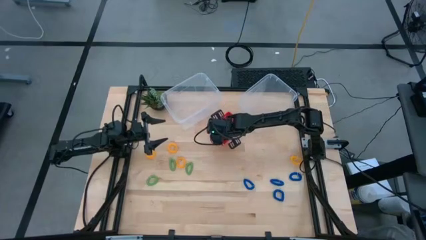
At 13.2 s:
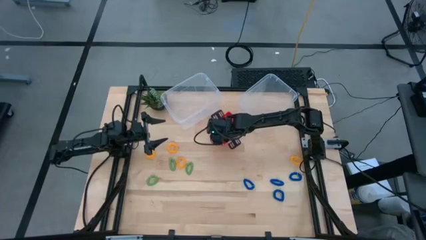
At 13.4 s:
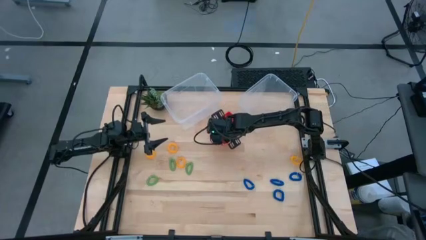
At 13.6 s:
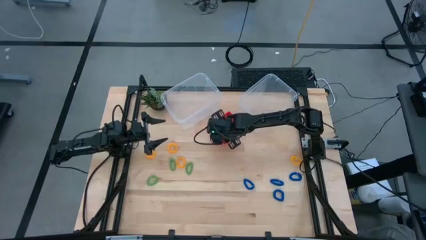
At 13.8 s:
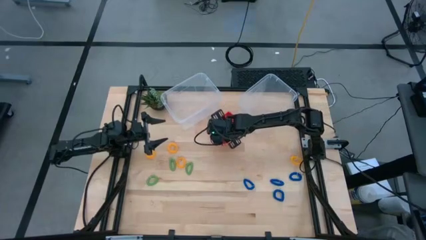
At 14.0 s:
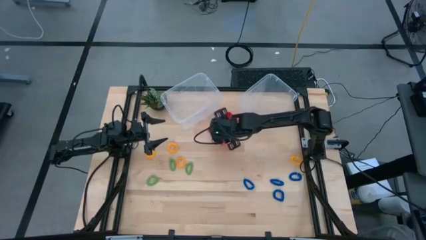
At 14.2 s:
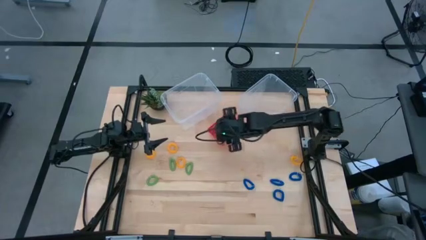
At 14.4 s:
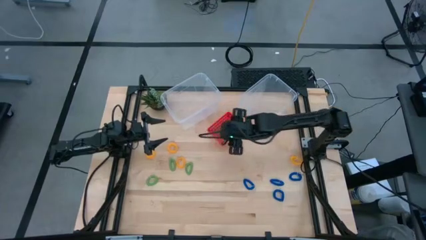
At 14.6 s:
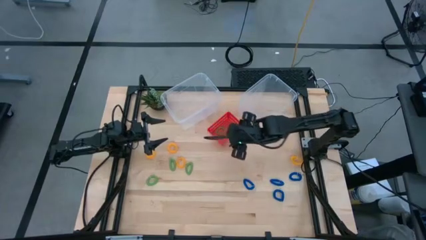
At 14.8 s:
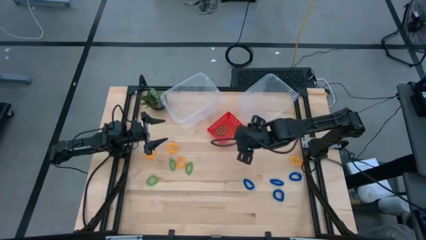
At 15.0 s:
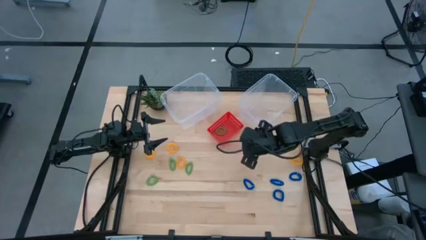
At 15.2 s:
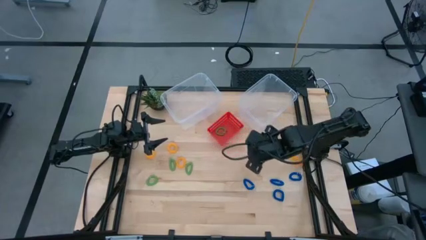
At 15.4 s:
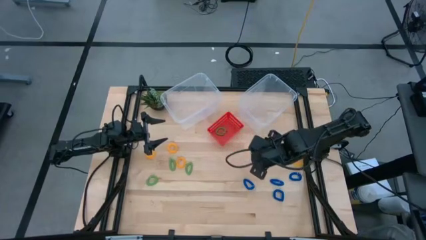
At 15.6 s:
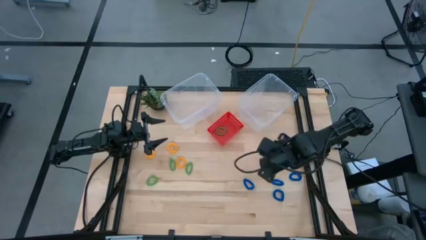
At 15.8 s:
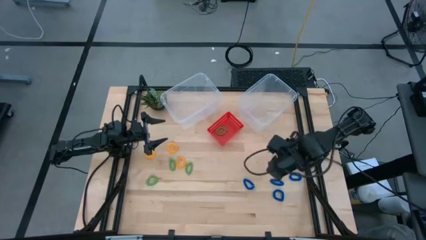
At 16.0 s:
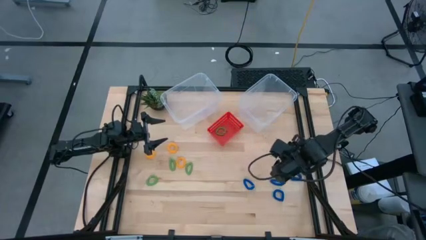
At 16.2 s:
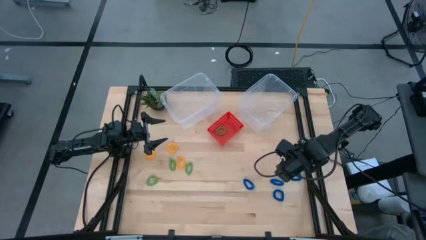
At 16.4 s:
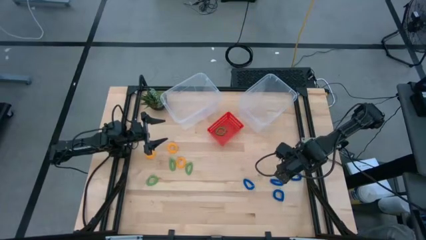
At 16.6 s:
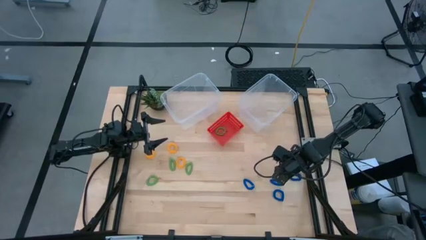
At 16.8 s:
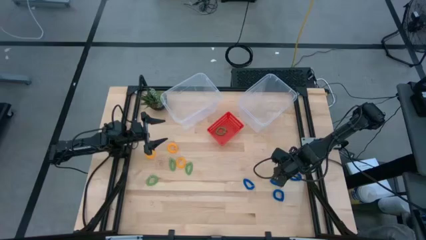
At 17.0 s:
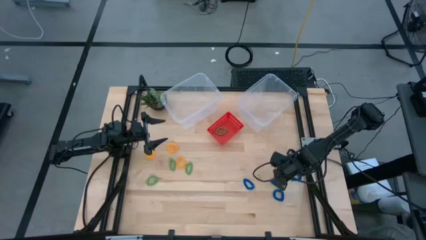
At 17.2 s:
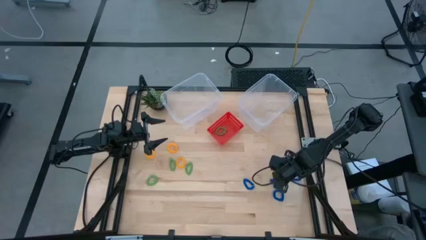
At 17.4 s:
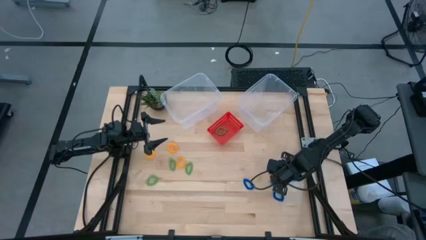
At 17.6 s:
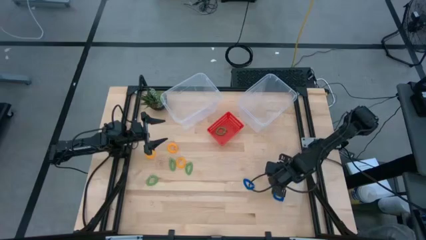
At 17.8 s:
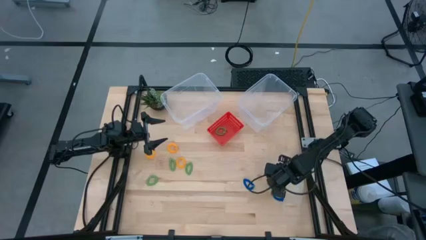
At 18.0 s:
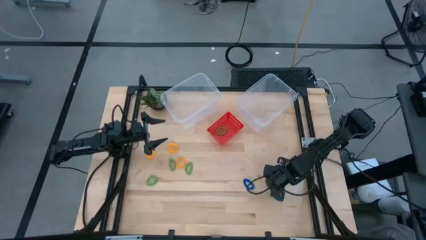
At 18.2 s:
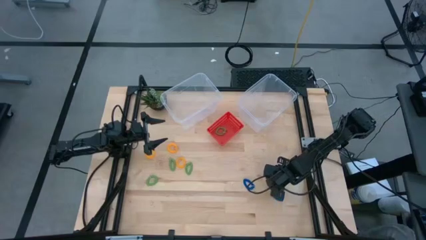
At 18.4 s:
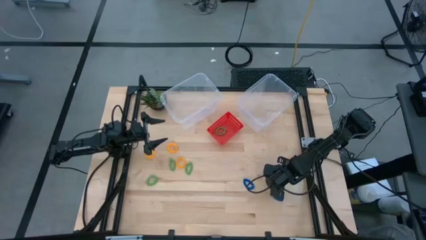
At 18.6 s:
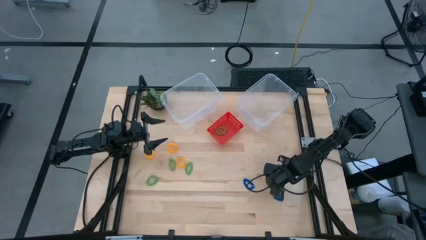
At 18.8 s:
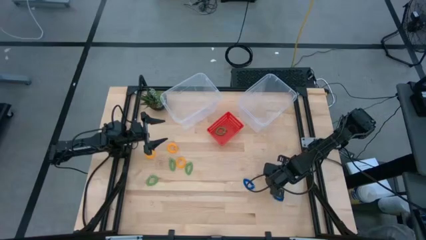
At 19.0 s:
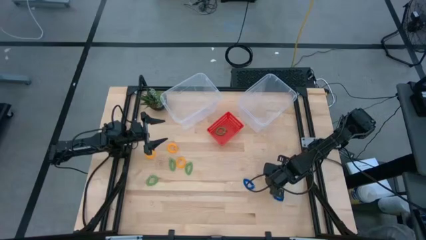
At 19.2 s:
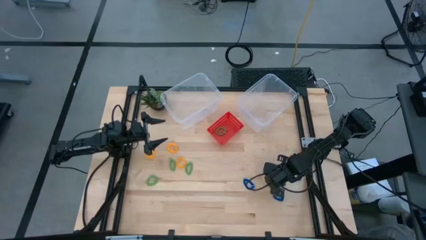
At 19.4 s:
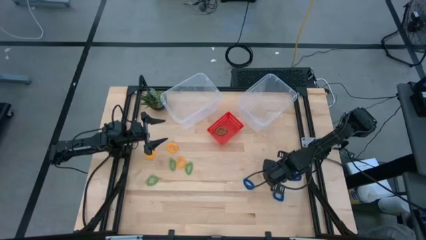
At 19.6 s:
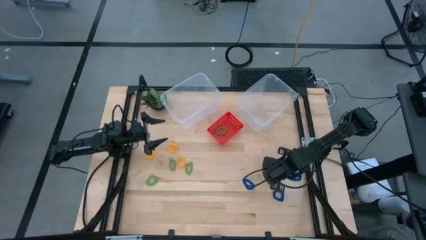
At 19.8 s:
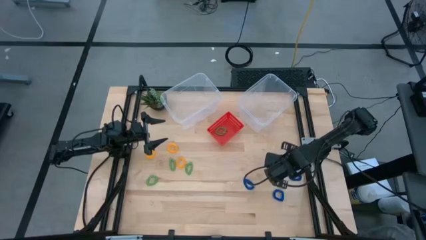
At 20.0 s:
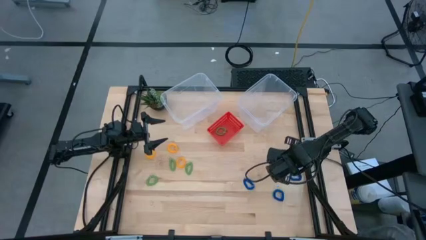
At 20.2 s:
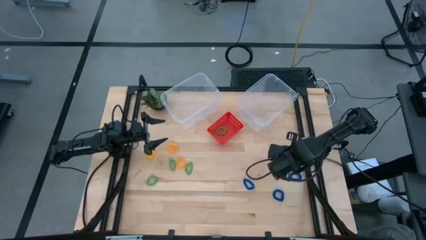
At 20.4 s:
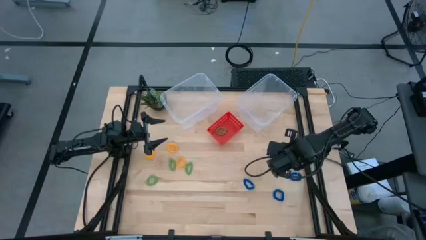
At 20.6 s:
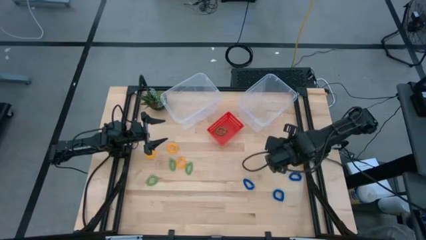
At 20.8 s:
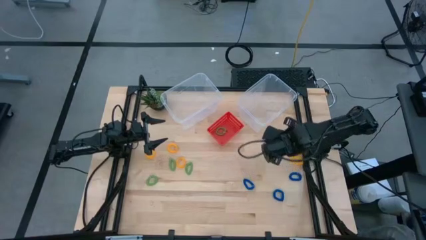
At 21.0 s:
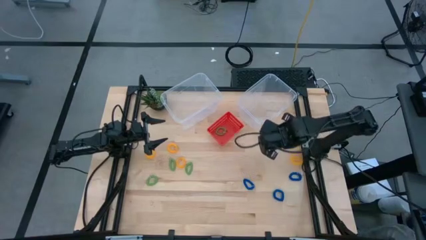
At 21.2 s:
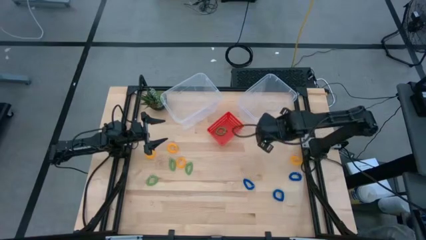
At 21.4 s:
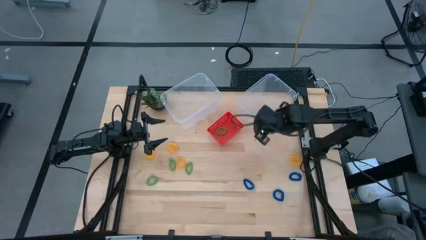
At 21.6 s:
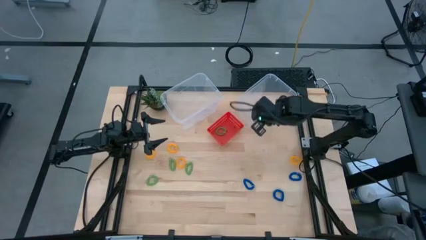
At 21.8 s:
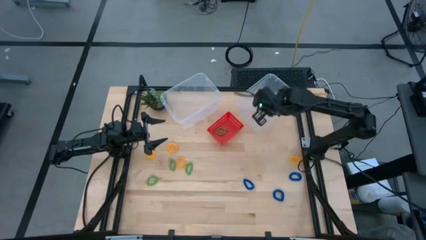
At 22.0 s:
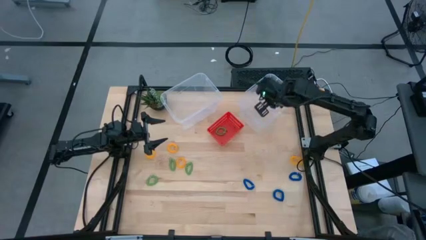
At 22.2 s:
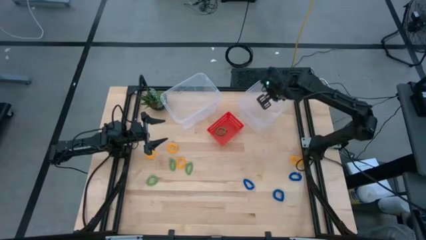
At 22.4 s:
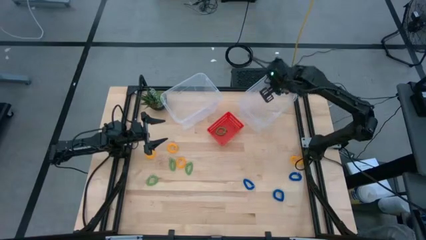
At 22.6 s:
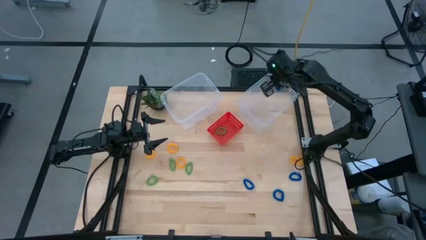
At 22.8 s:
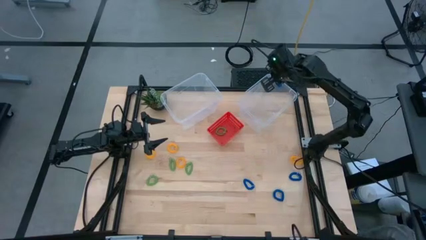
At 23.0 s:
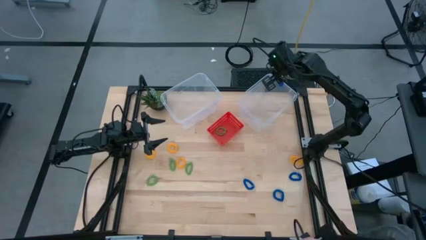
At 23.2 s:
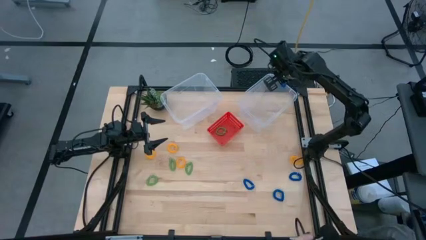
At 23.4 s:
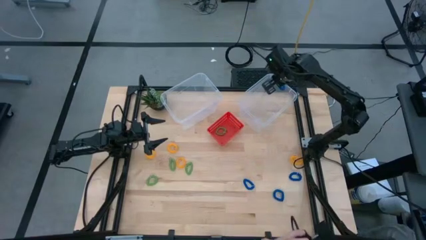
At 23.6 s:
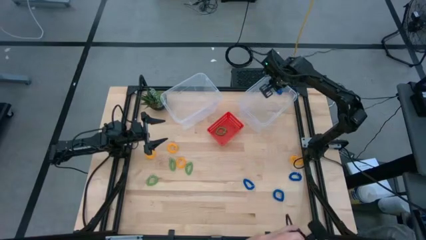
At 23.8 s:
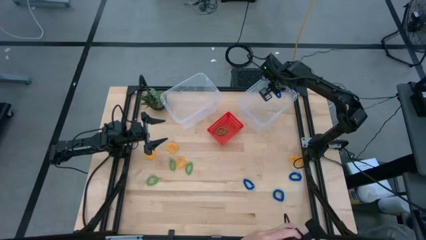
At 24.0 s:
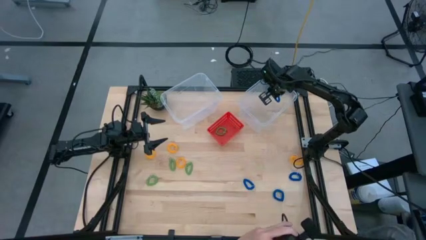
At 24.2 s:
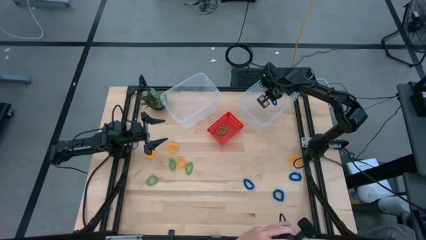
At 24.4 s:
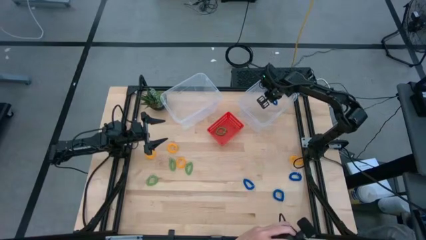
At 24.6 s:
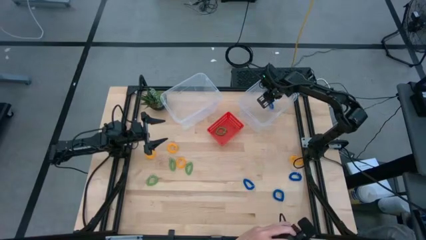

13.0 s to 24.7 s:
Task: Sort spring keychains
Put the blue spring keychain into the right transparent bin
